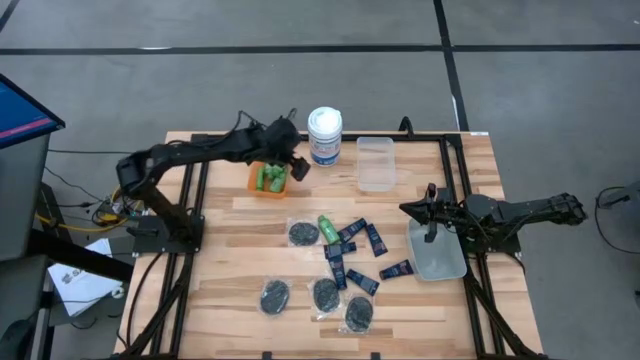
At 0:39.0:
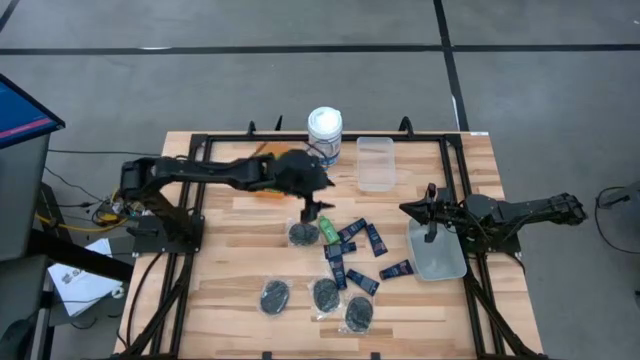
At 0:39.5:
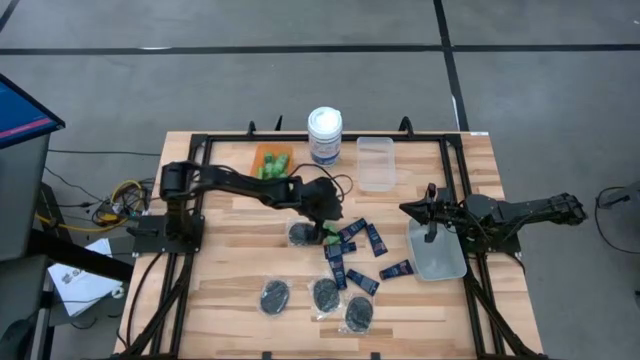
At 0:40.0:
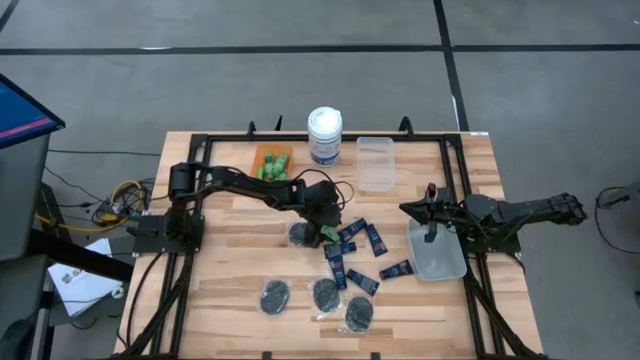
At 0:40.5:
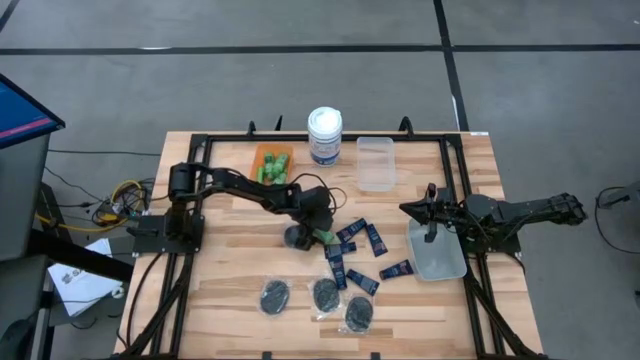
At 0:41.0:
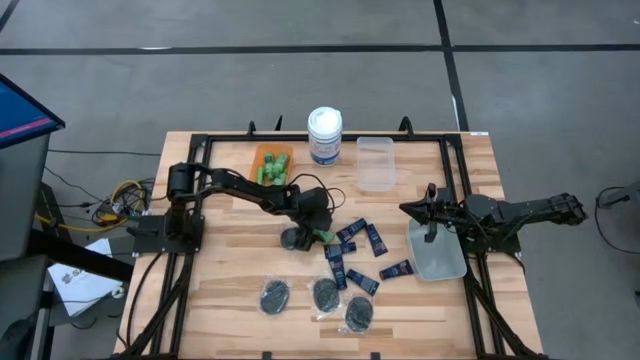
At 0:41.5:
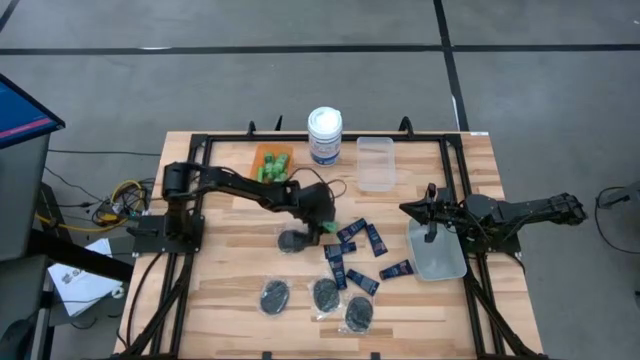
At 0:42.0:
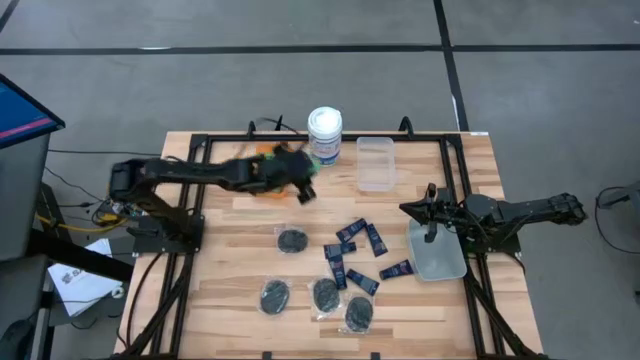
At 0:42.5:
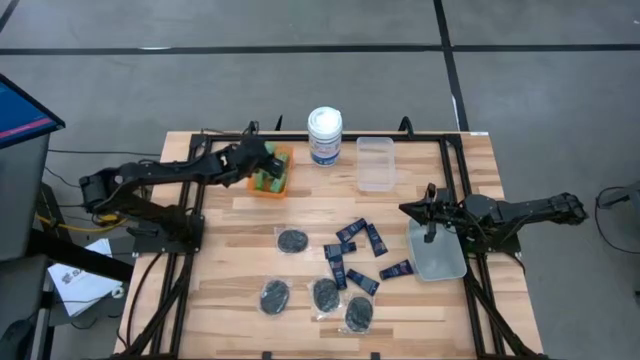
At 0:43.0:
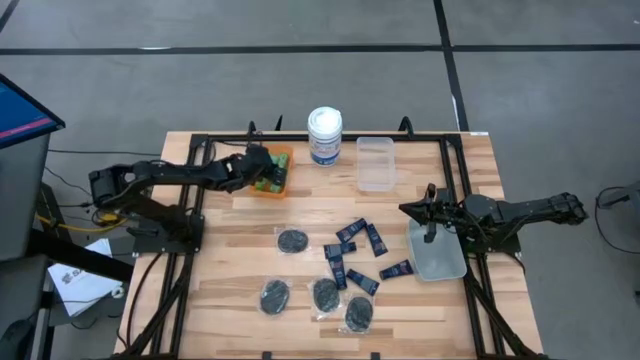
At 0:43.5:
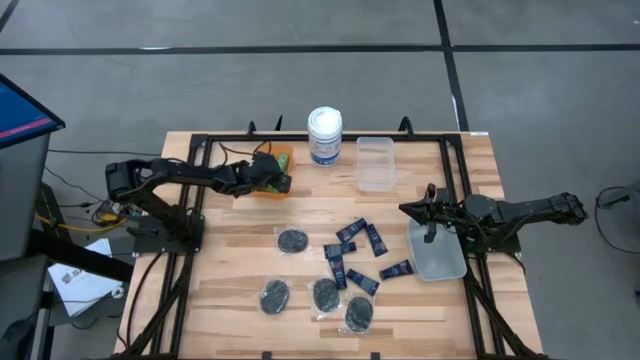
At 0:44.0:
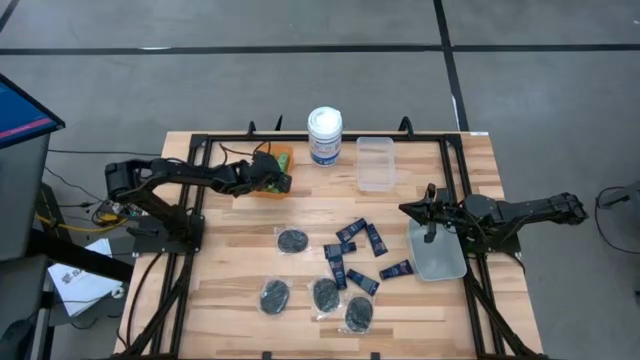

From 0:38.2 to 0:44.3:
Task: Pick & Place Travel size toiletries
Put the green shampoo into the orange bin

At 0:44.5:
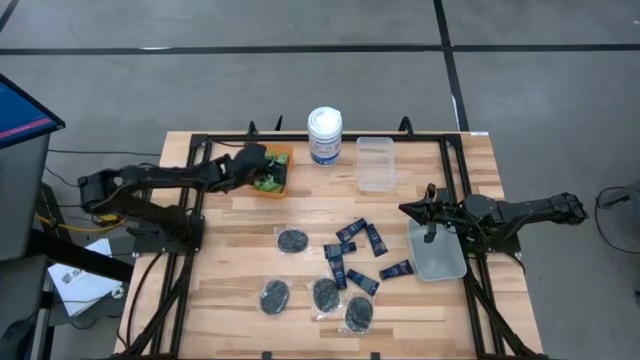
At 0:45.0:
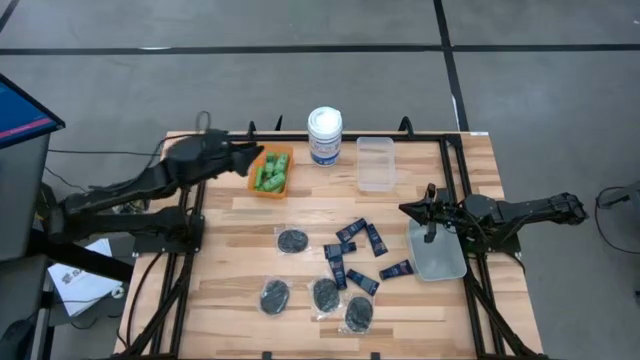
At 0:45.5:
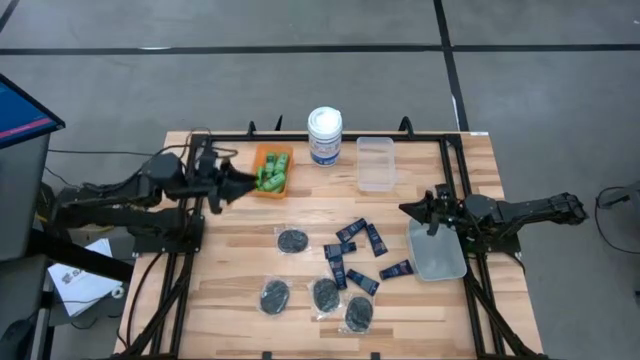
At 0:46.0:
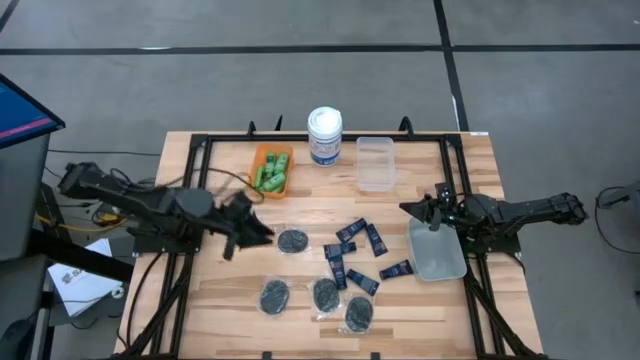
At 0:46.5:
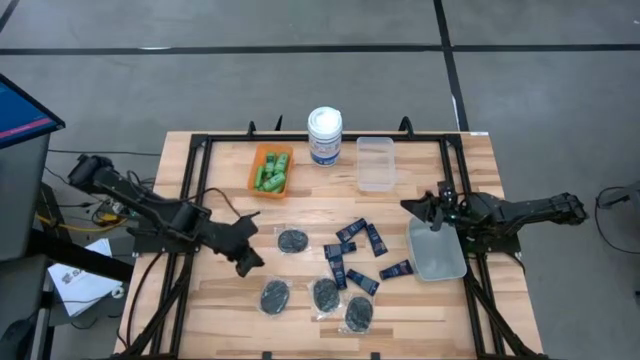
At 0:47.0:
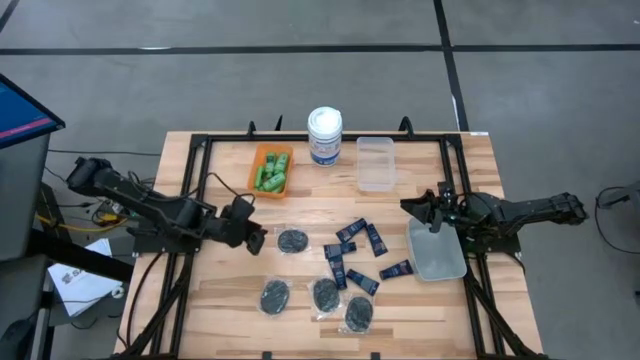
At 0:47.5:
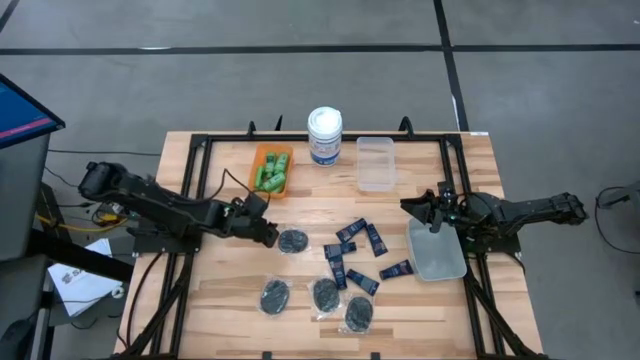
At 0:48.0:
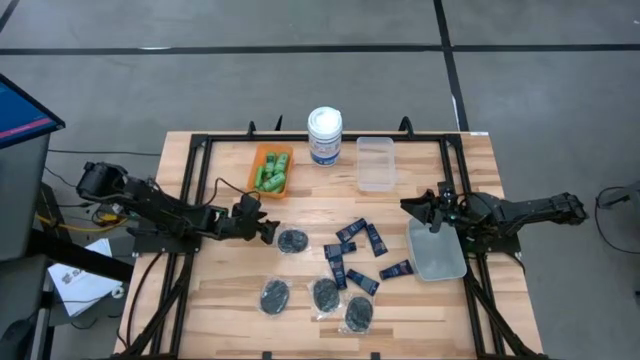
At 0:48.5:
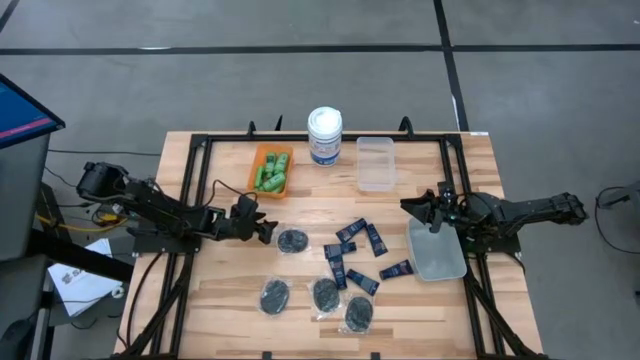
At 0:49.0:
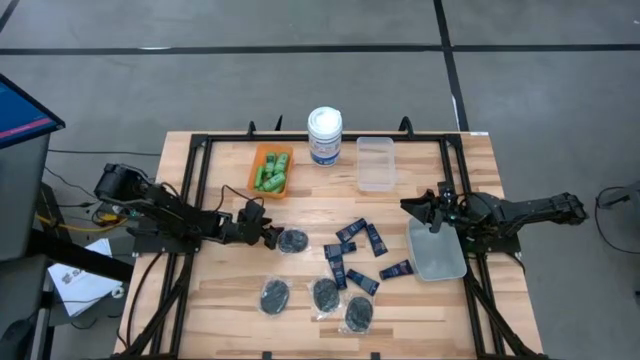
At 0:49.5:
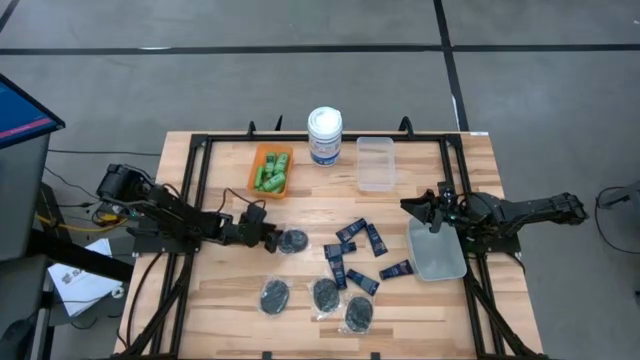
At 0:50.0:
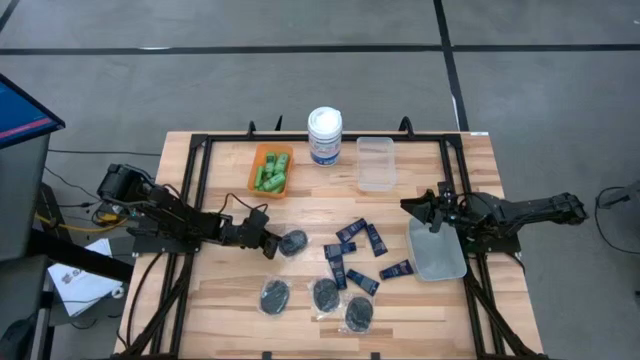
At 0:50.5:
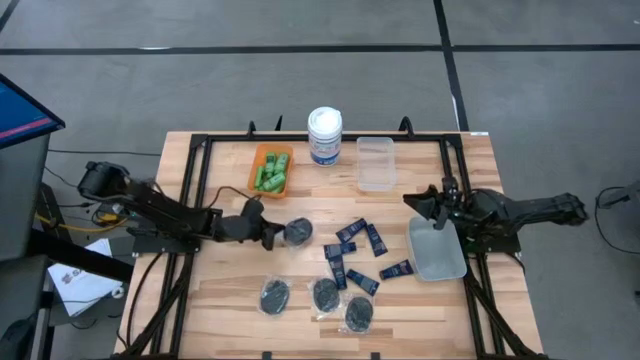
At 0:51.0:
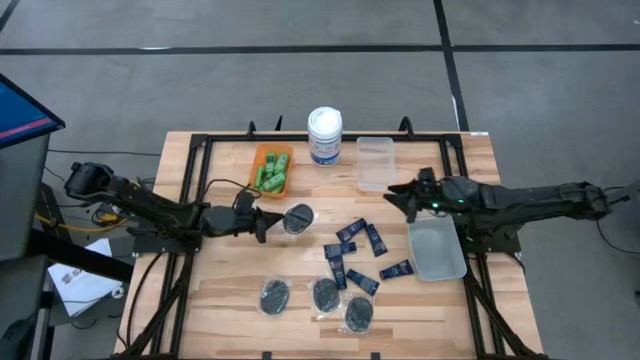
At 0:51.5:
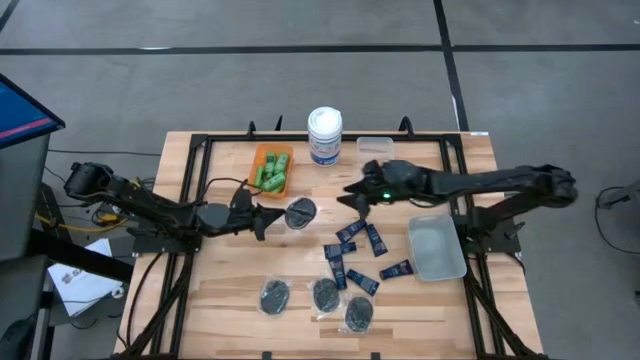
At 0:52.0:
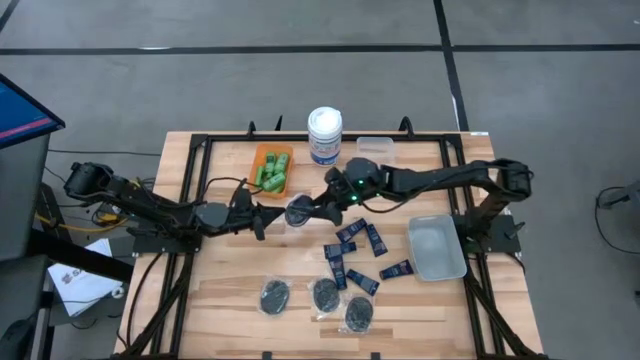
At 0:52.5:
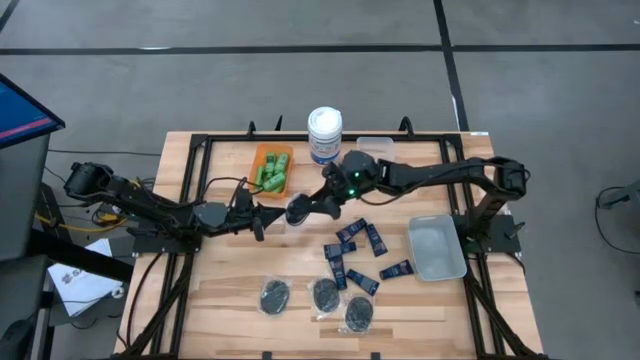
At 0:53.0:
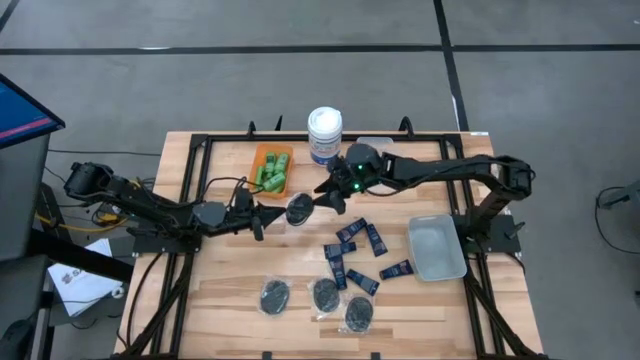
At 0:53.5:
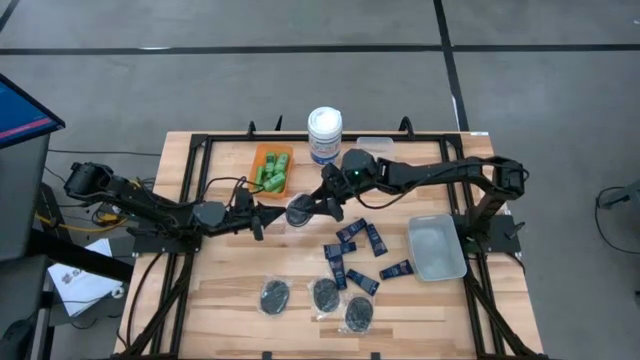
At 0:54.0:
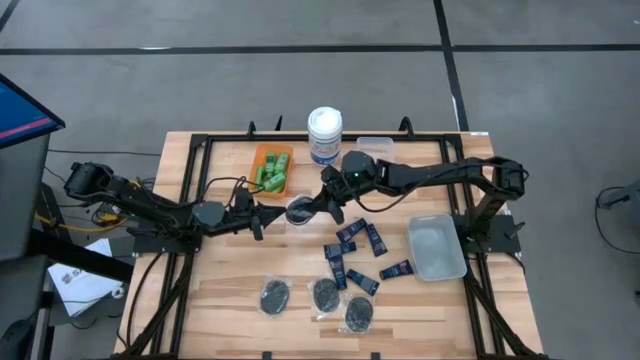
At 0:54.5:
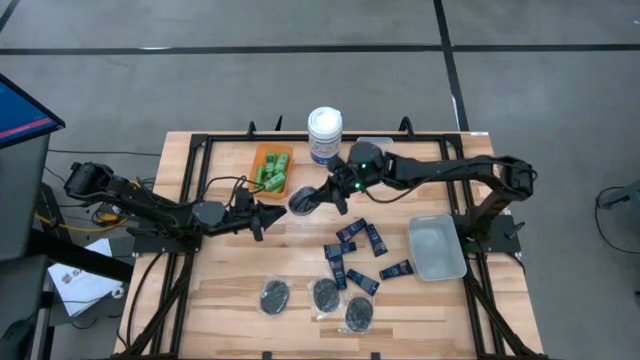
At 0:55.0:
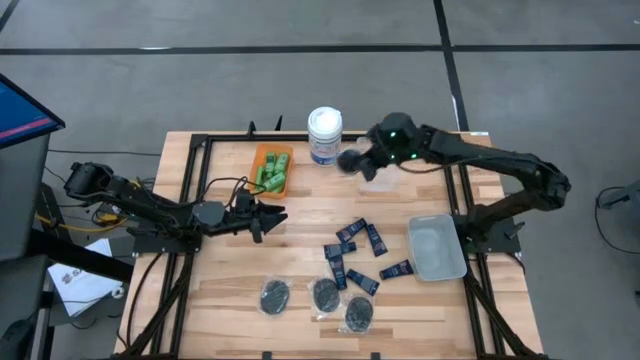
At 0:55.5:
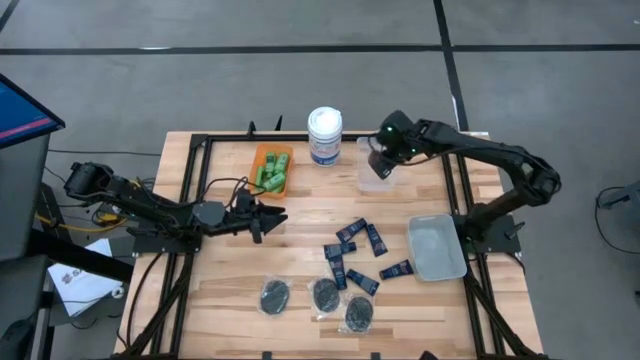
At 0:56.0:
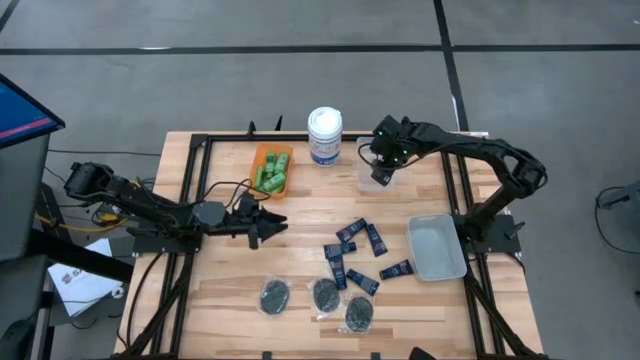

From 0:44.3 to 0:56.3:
Put the black hairbrush into the white bin

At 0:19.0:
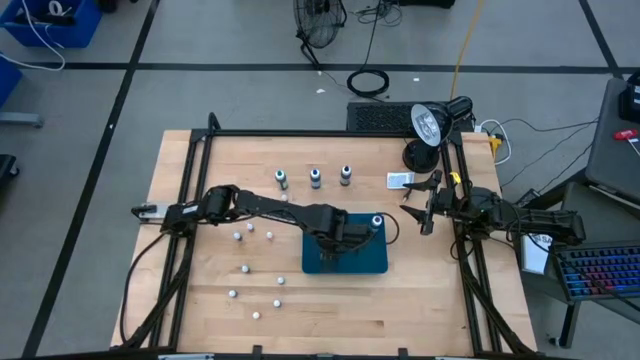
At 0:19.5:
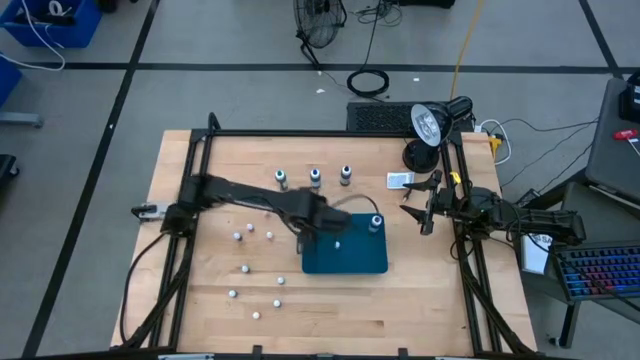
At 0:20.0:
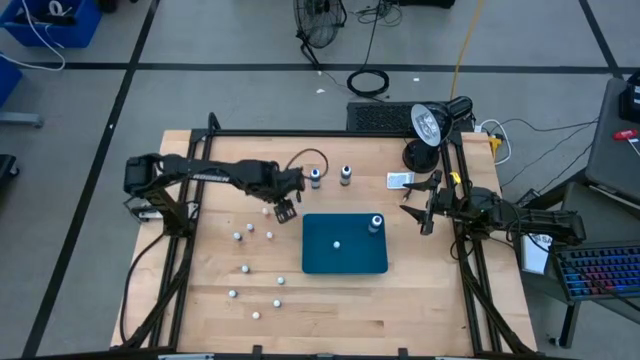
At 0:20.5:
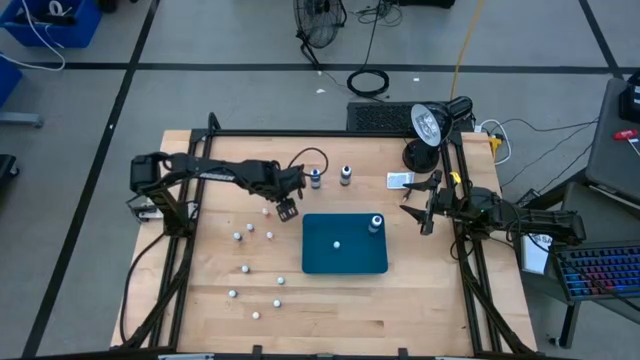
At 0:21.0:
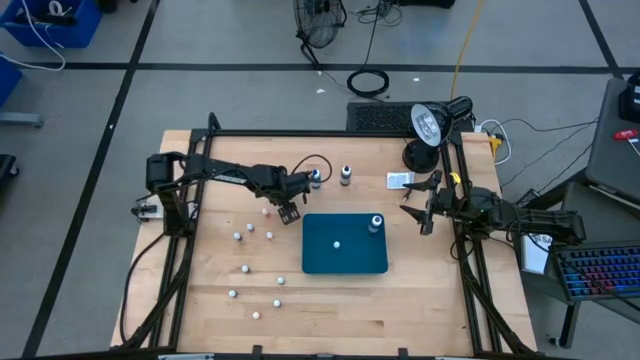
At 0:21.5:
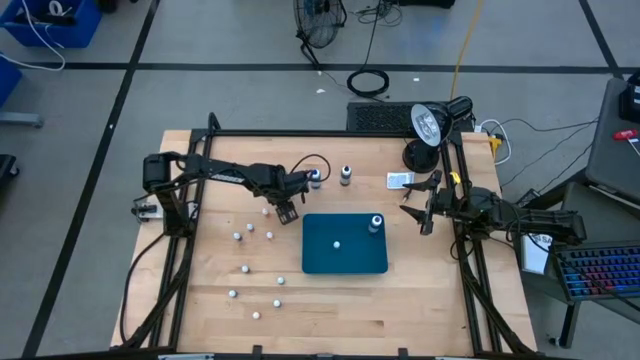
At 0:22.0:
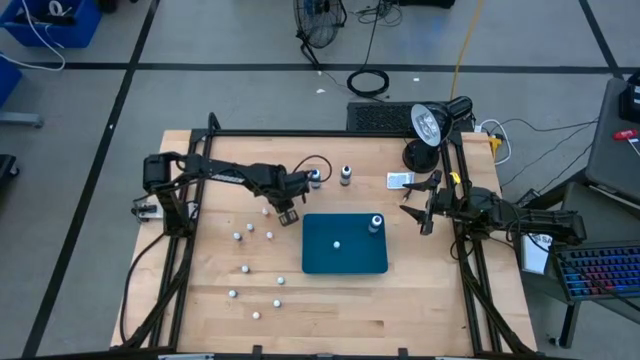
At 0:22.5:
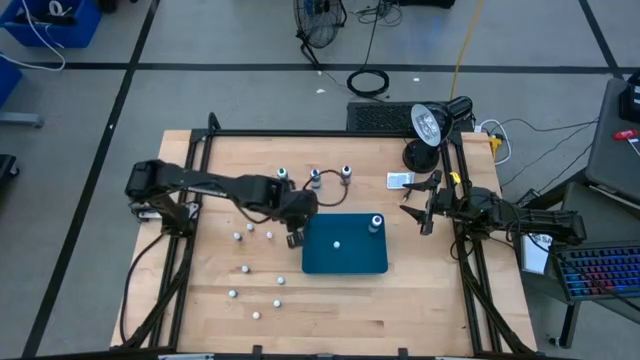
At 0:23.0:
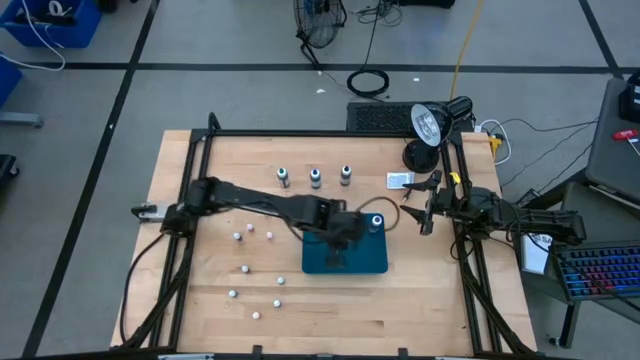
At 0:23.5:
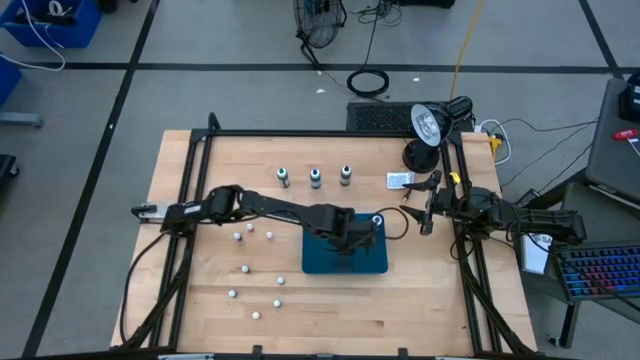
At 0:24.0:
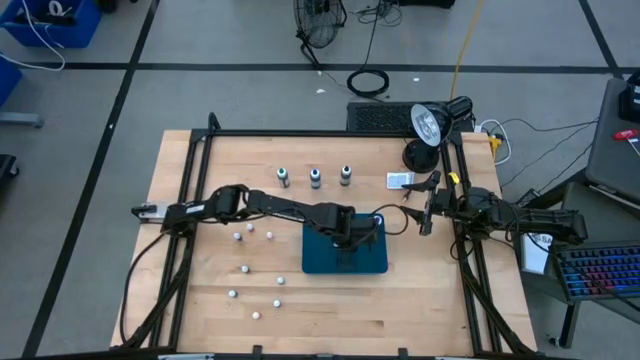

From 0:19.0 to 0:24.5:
Task: Pick & Place food coloring
Put the top small purple food coloring bottle into the blue bin
